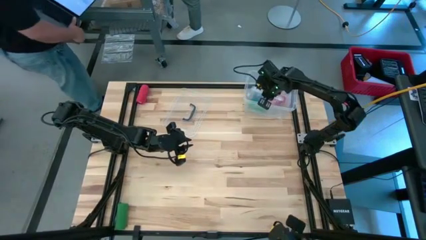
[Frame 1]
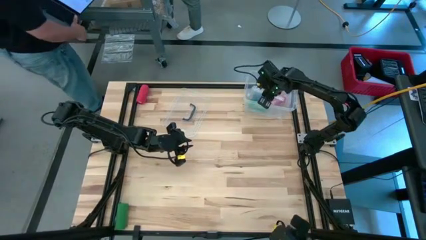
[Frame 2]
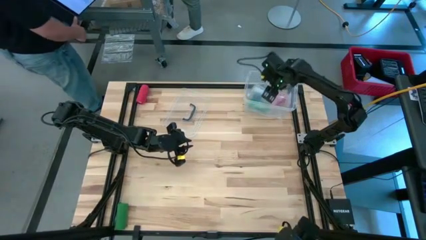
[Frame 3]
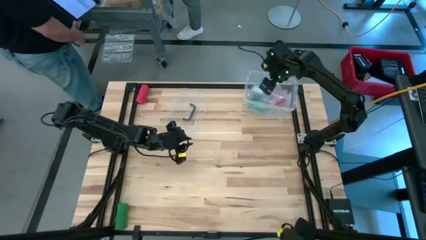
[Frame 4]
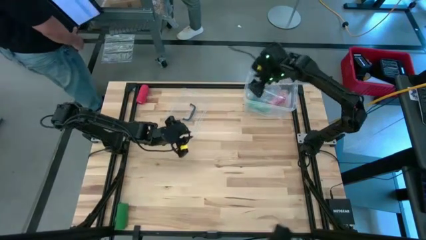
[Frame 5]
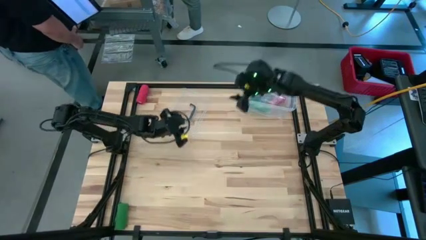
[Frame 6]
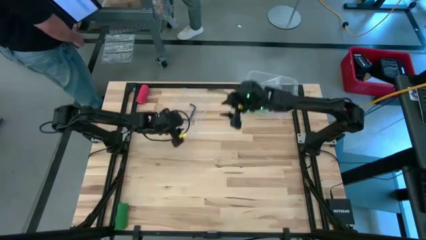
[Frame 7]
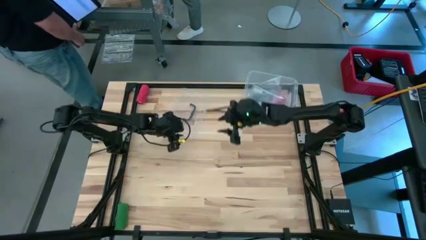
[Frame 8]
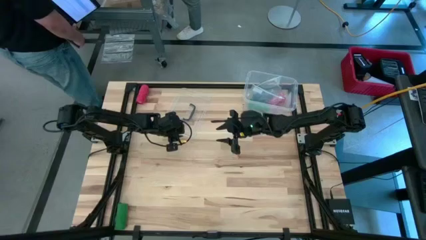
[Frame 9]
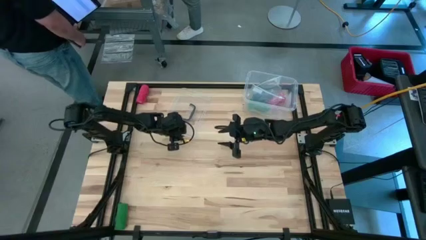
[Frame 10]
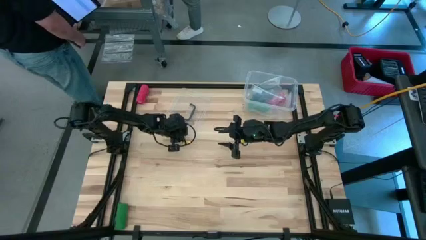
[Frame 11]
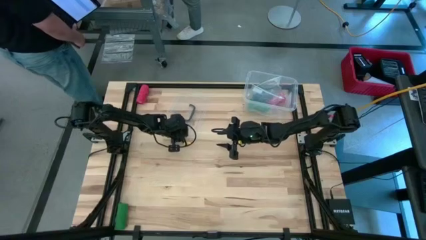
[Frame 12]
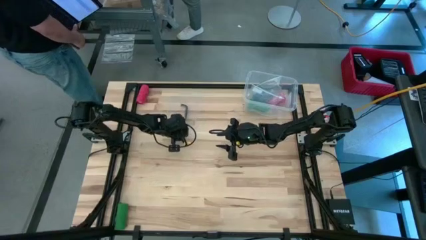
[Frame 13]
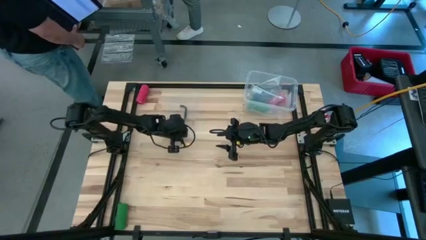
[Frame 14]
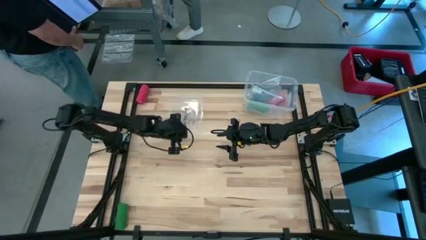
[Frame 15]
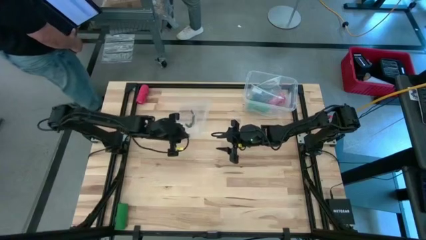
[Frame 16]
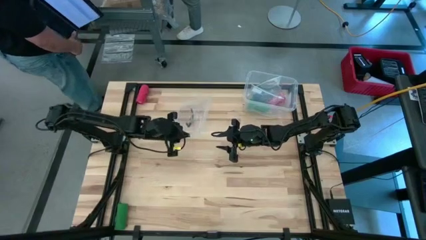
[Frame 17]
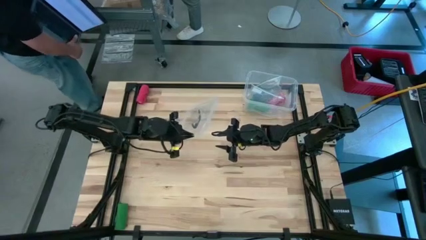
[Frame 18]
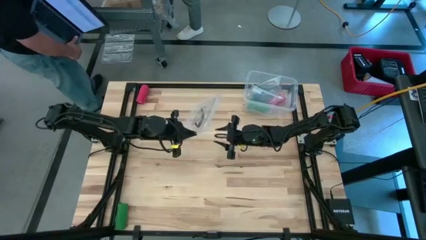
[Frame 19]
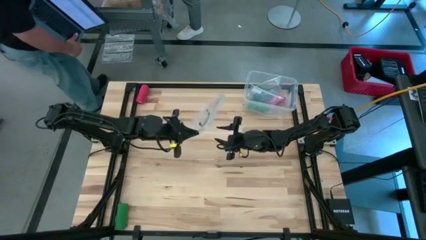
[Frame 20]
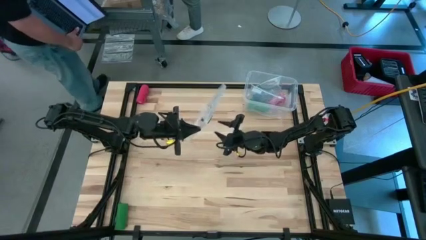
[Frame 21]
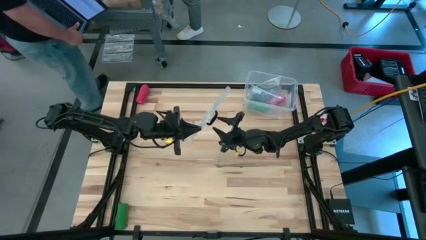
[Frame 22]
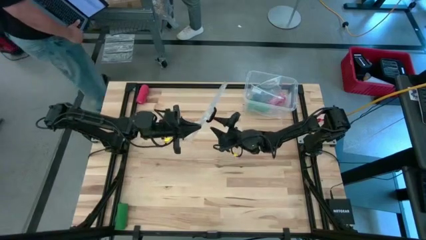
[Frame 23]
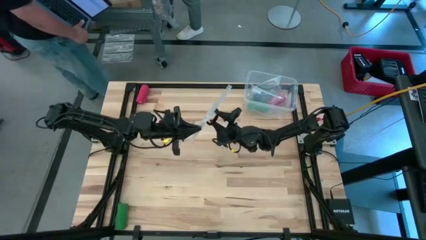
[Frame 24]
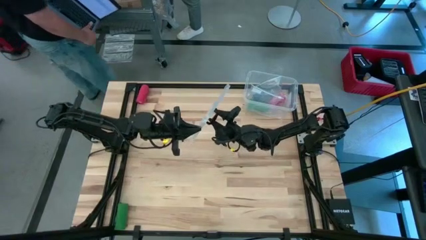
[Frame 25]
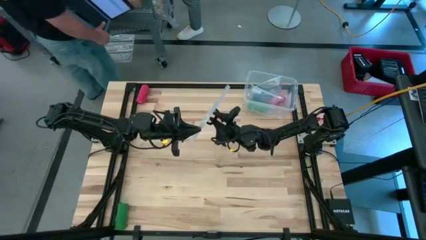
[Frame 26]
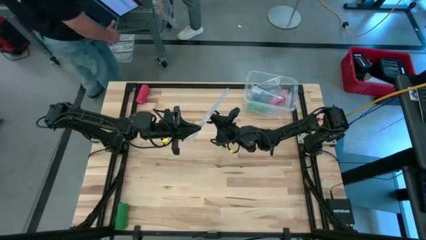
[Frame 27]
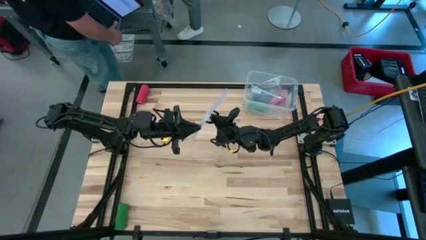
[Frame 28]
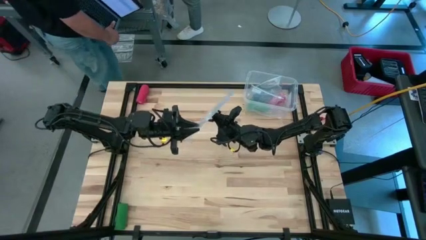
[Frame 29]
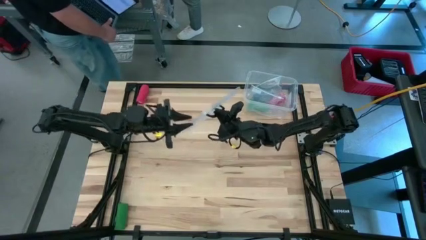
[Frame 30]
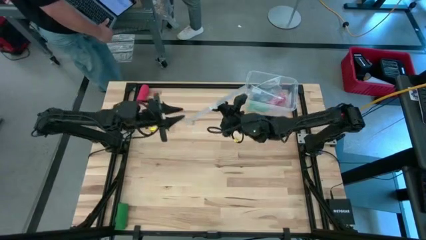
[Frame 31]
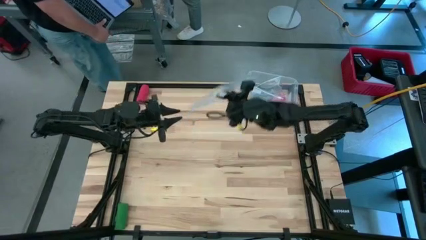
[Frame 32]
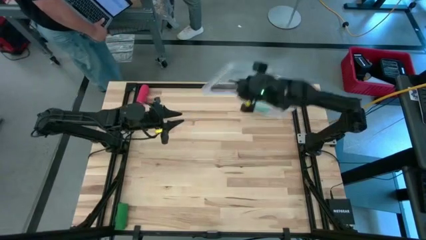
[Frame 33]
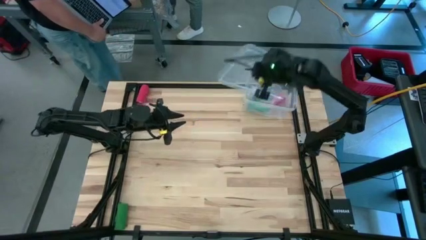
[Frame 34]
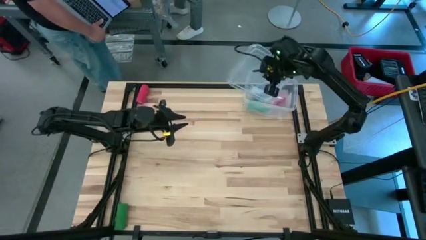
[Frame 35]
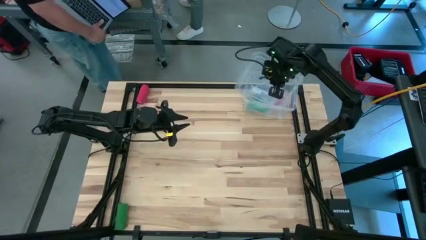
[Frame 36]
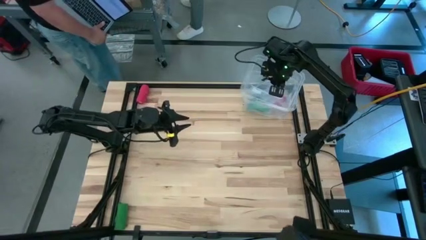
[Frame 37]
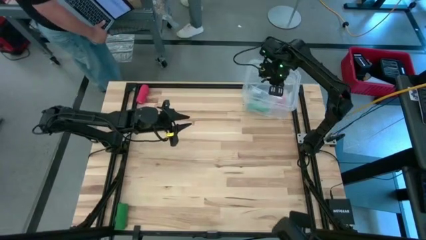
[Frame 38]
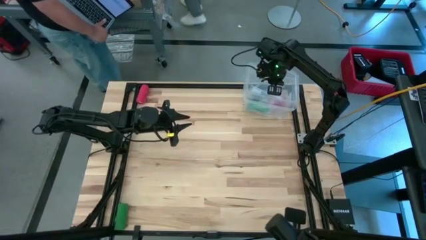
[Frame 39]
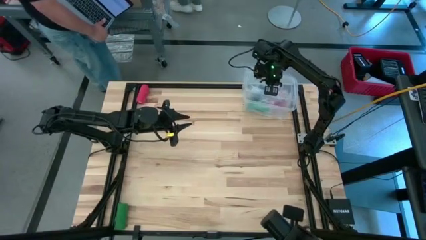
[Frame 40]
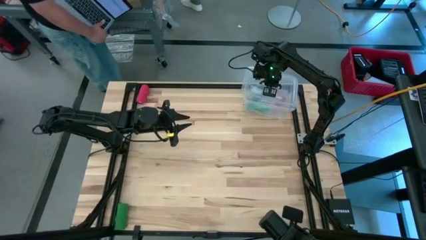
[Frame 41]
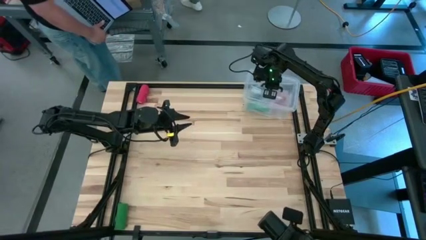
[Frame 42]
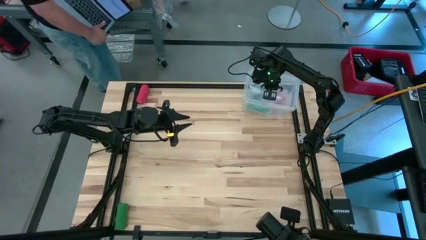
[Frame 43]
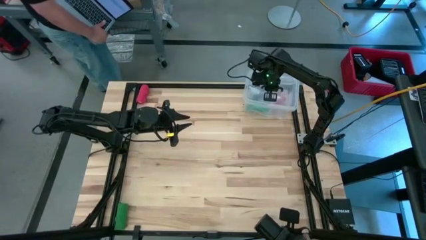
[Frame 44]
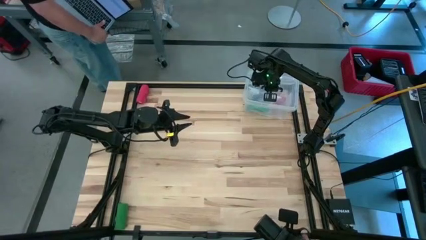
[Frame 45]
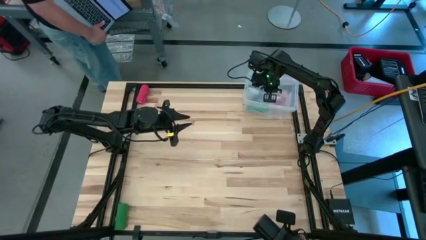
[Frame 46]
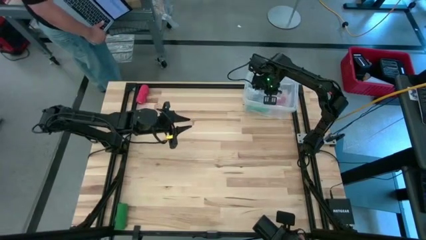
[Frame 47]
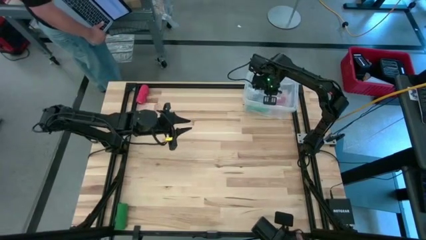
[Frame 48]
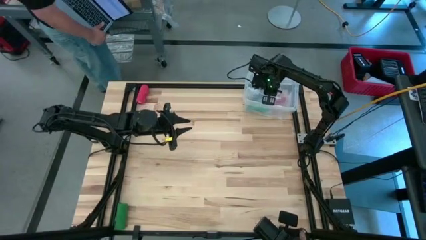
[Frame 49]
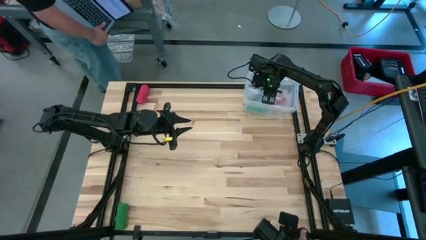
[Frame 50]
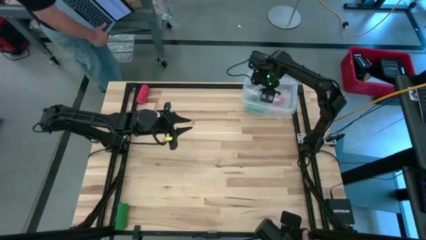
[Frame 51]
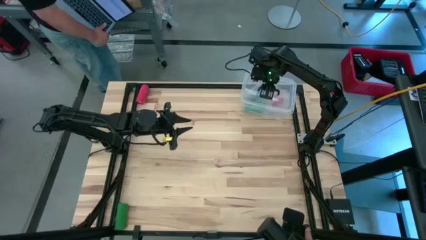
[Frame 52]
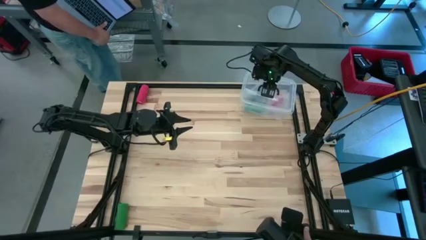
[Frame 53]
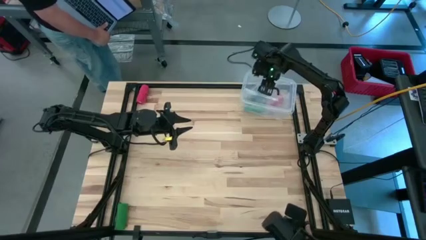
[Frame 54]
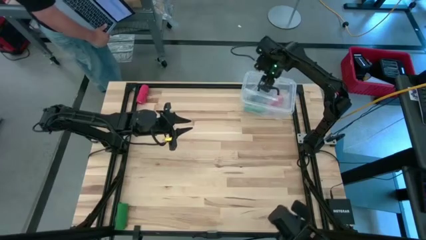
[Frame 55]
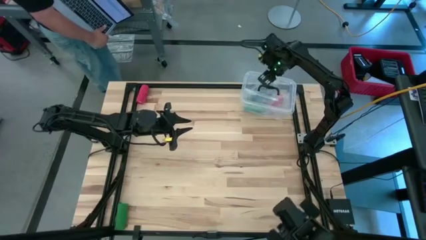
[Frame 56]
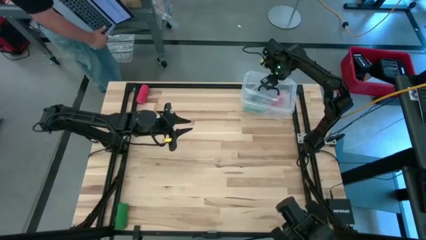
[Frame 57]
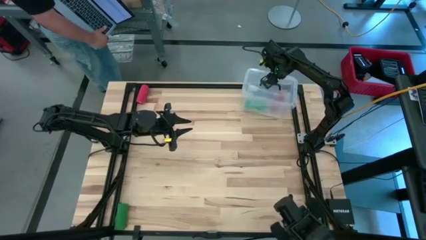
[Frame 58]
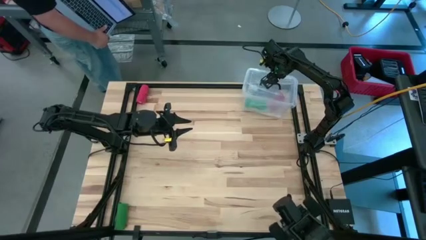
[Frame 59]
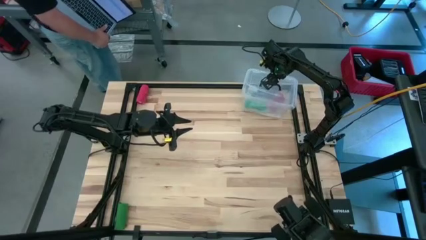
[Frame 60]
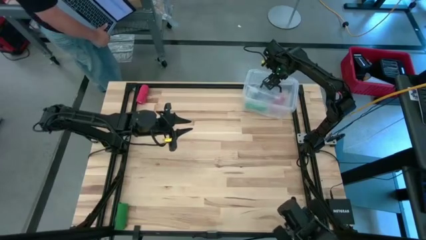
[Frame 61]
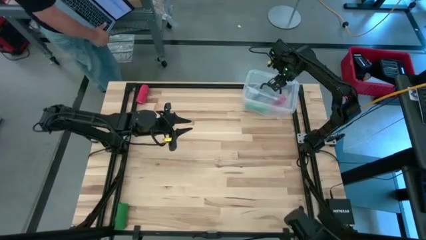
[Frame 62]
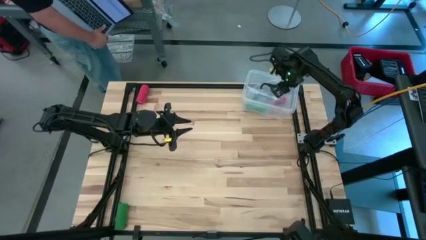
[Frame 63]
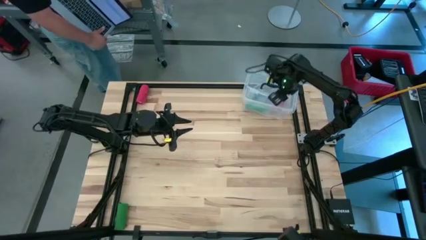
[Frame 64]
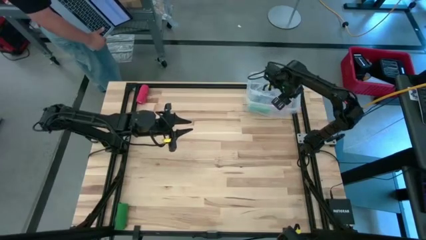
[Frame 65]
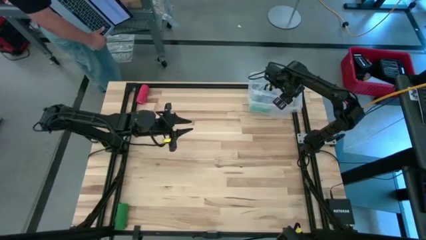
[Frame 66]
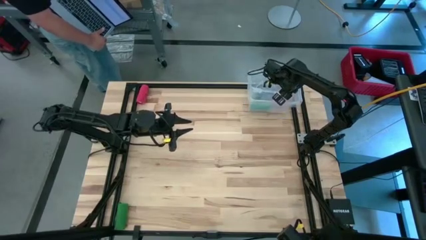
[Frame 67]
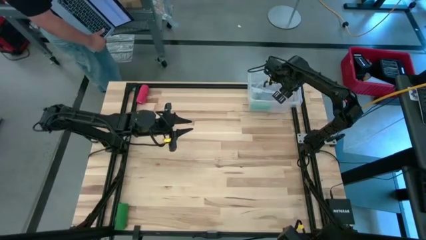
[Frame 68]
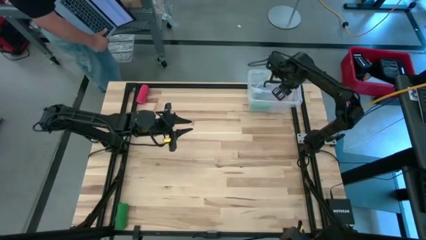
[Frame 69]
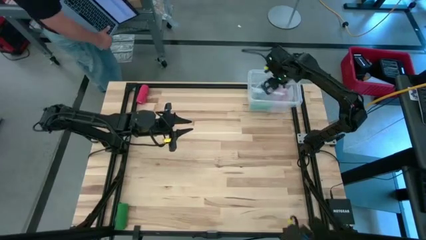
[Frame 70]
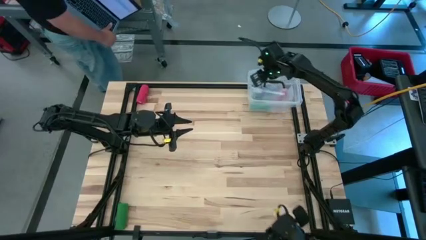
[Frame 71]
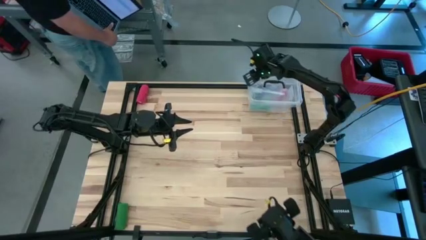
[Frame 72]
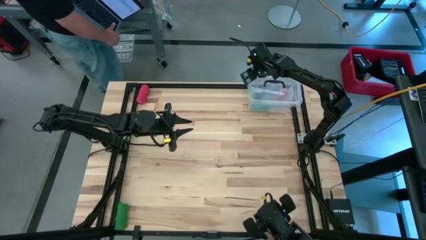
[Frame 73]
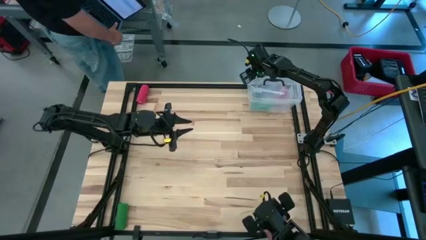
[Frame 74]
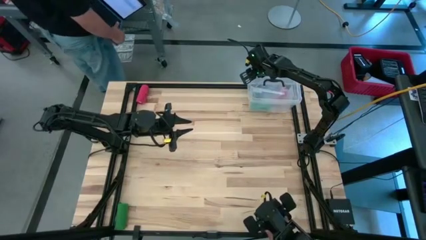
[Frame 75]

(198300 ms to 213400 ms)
Task: Roll bandage
Close the transparent container

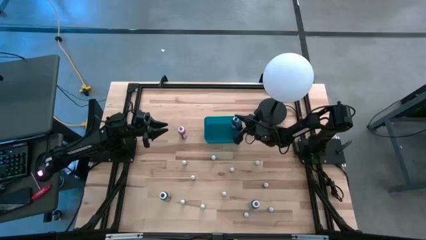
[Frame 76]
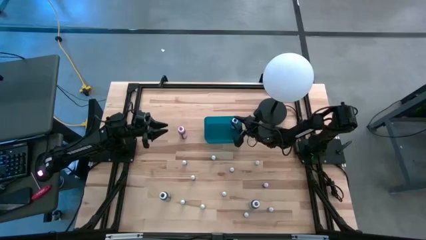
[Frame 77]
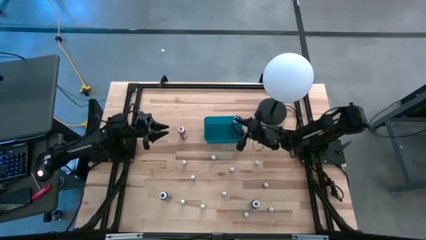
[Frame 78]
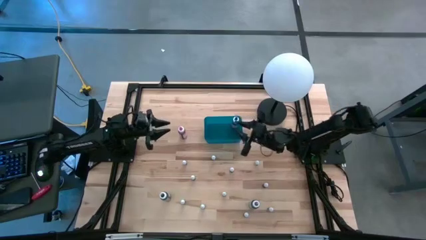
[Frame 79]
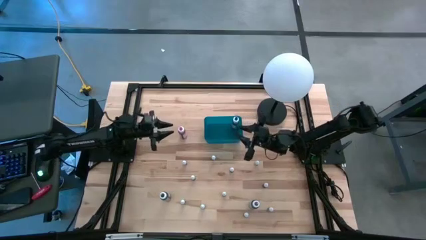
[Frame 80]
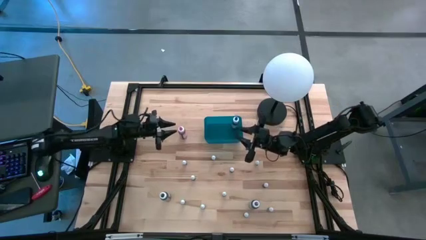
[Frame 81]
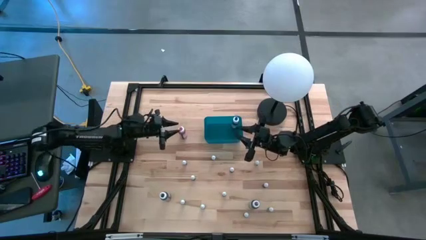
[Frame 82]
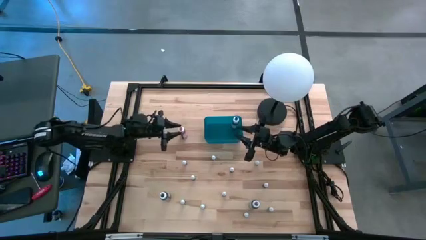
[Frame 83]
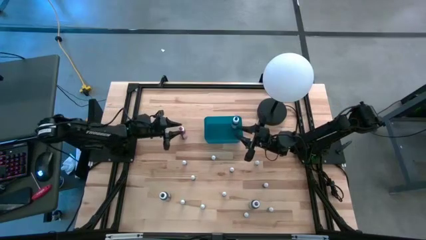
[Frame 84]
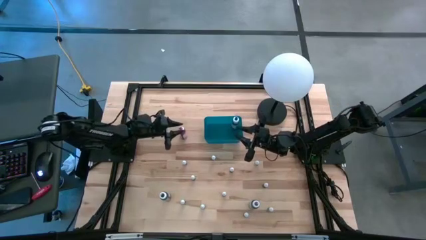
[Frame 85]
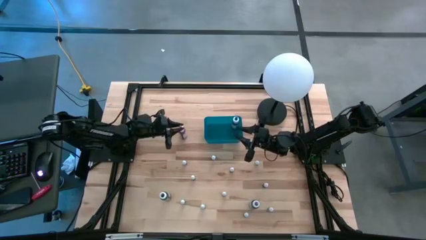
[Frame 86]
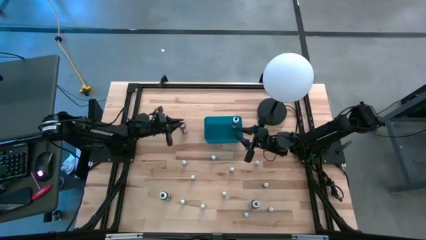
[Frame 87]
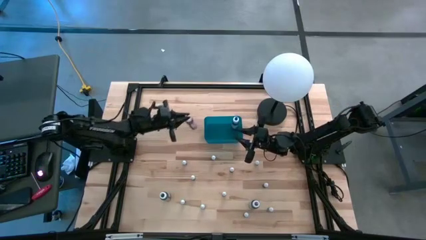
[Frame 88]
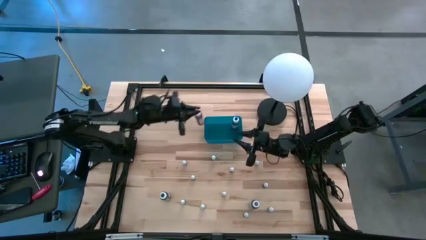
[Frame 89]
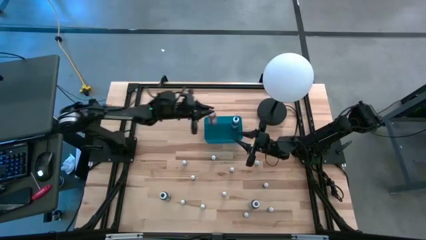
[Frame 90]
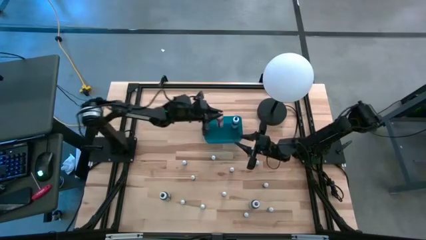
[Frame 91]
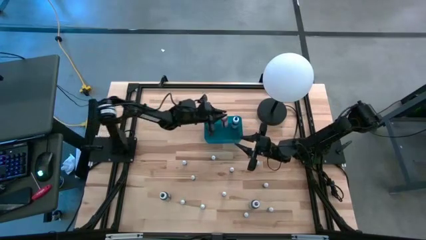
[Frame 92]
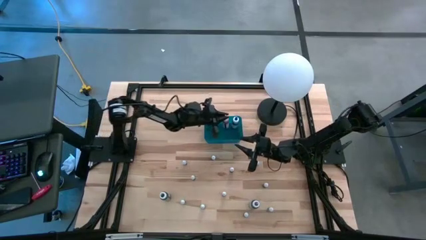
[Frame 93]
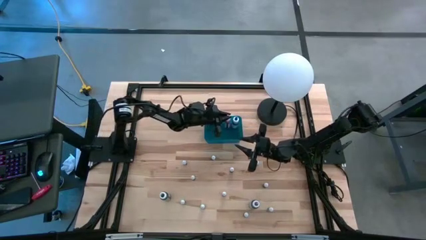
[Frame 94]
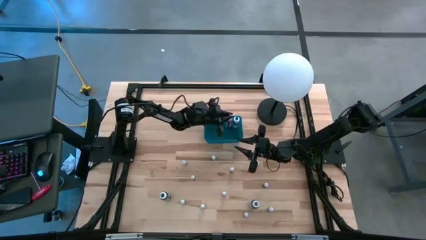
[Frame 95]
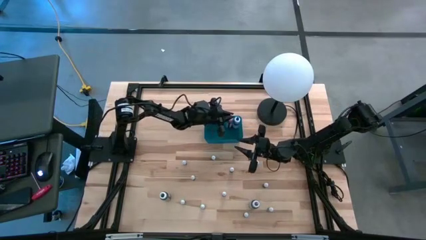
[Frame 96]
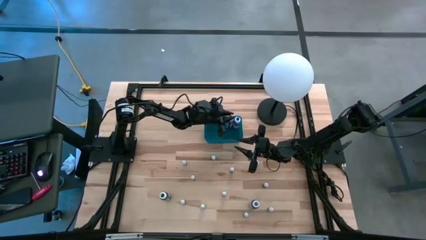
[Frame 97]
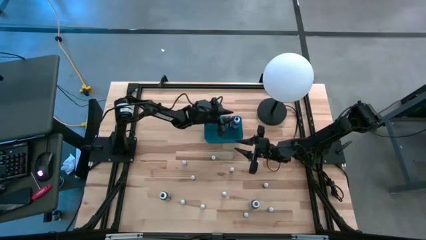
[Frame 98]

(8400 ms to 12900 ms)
Task: Pick & Place food coloring
Put the large pink food coloring bottle into the blue bin
